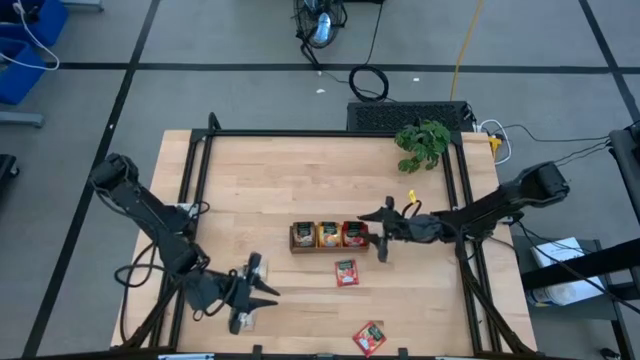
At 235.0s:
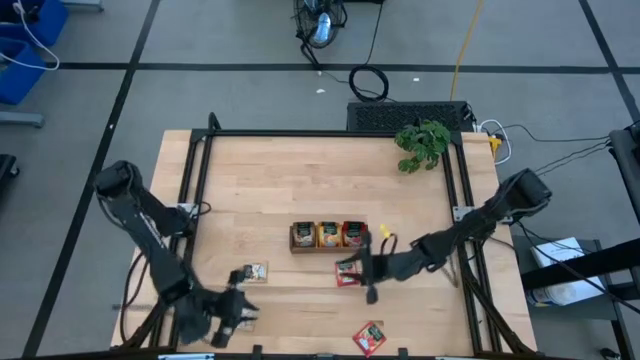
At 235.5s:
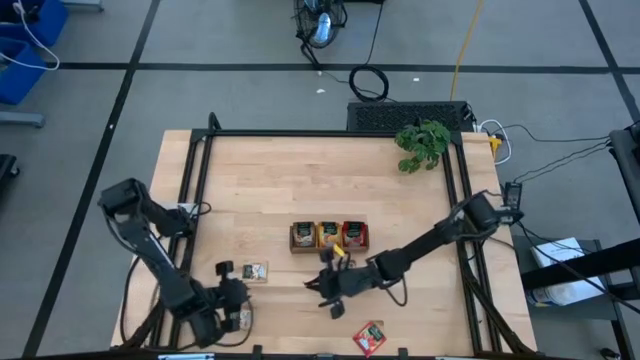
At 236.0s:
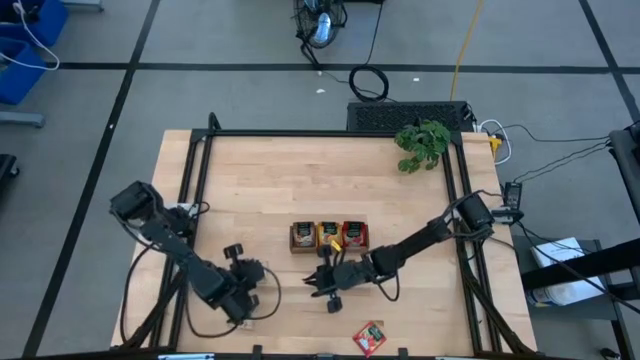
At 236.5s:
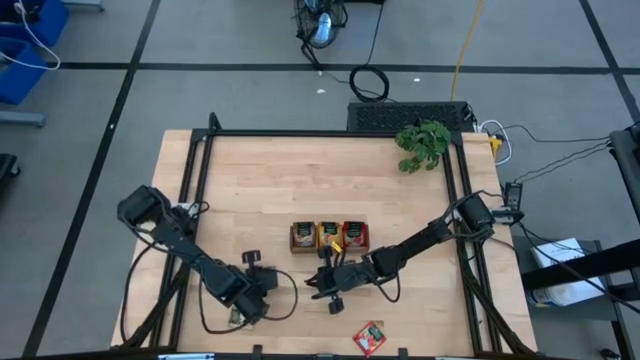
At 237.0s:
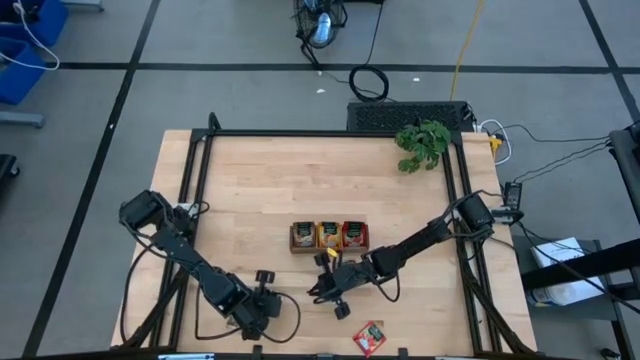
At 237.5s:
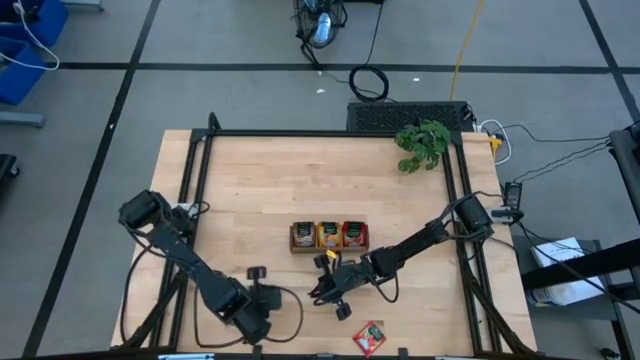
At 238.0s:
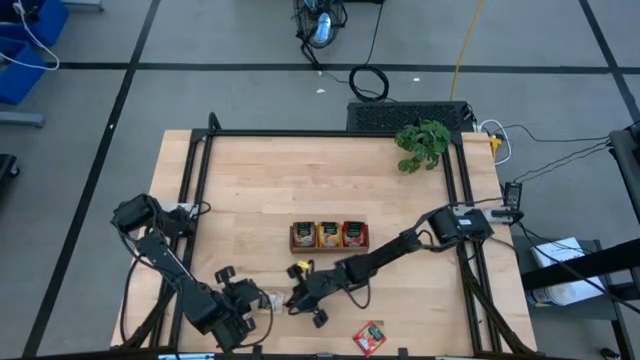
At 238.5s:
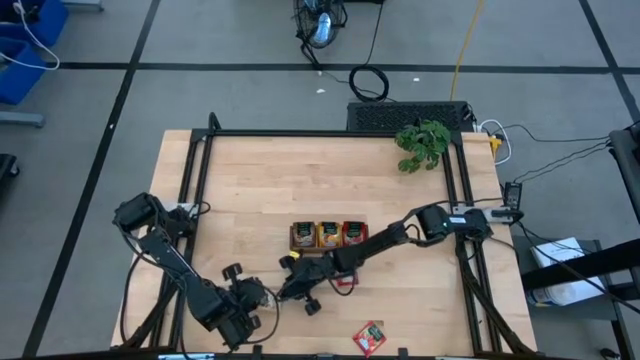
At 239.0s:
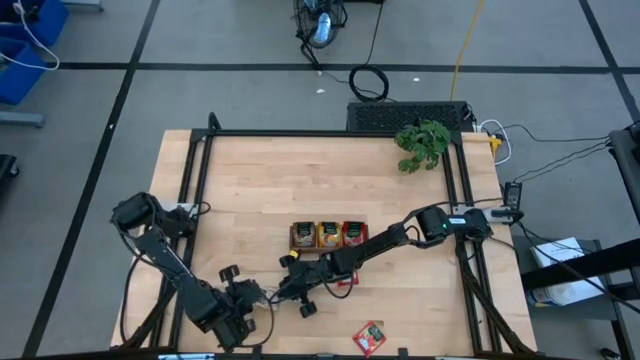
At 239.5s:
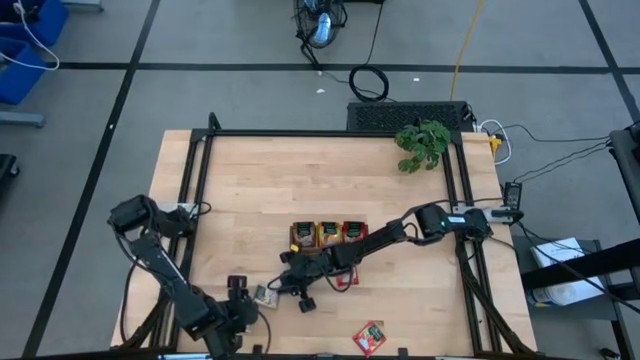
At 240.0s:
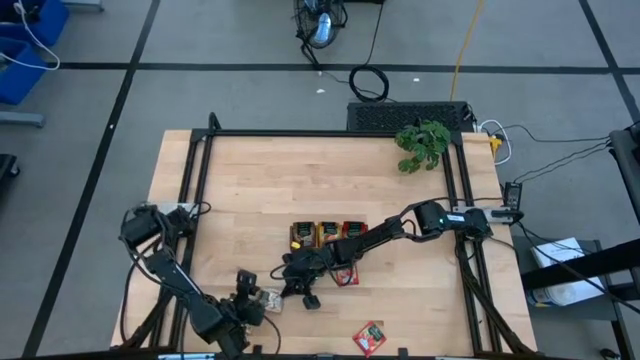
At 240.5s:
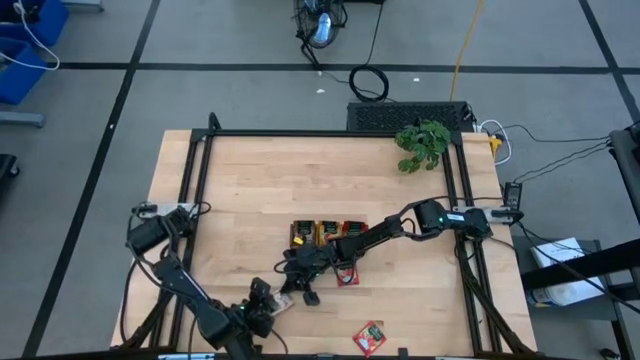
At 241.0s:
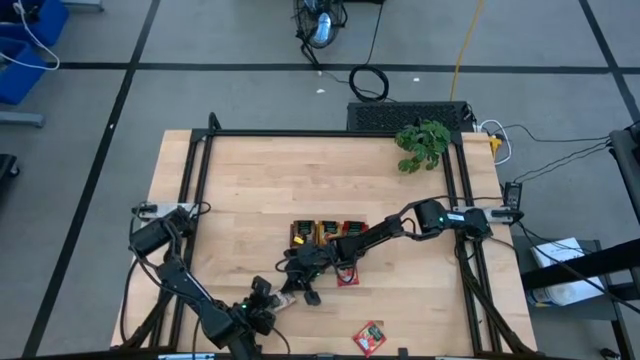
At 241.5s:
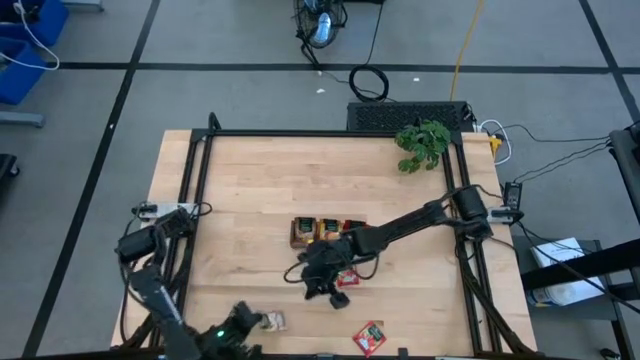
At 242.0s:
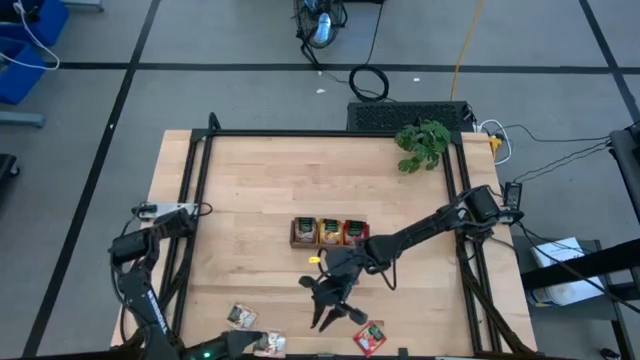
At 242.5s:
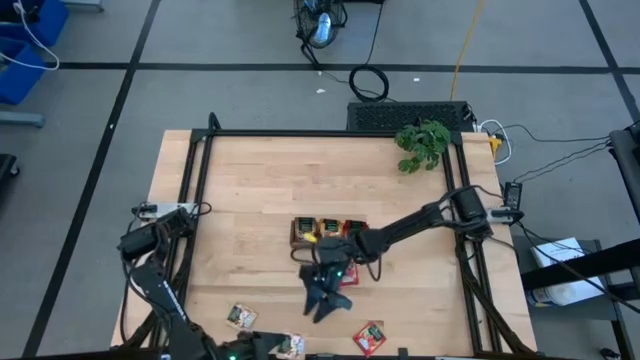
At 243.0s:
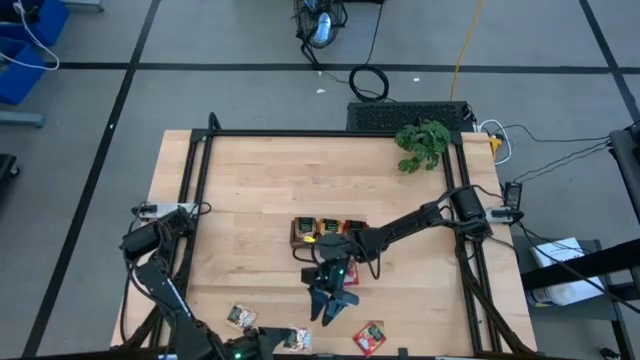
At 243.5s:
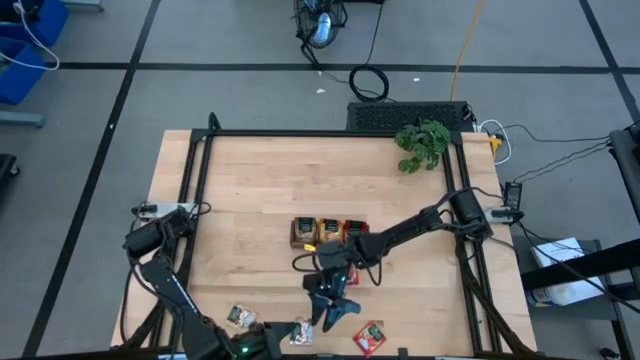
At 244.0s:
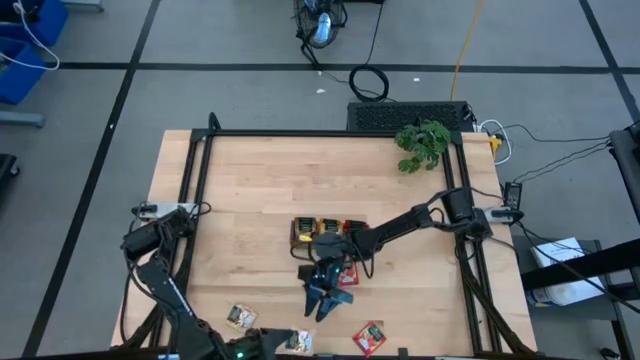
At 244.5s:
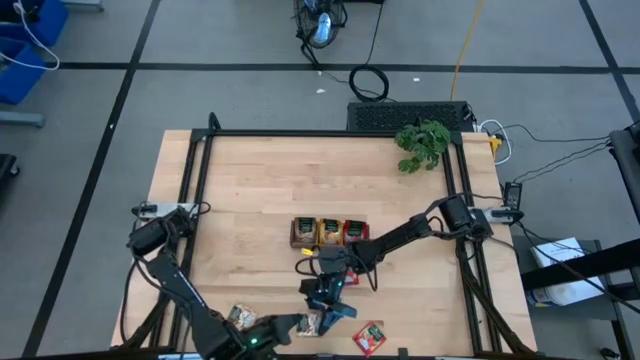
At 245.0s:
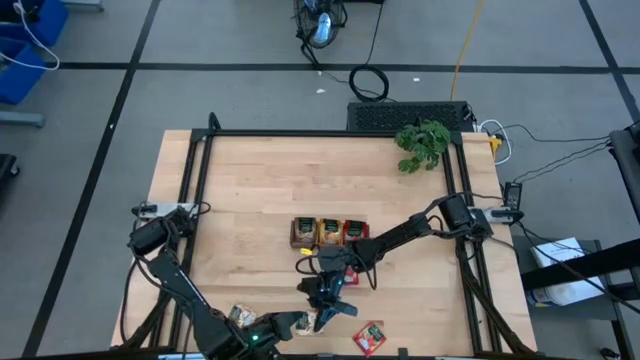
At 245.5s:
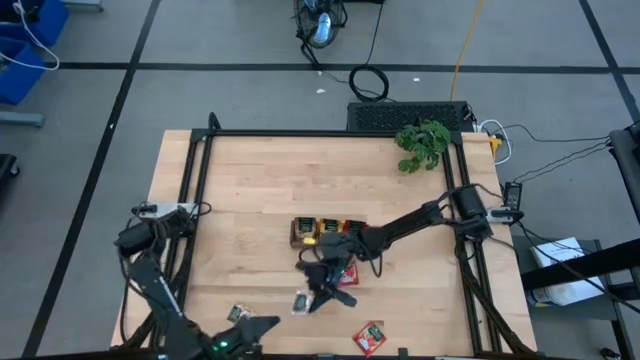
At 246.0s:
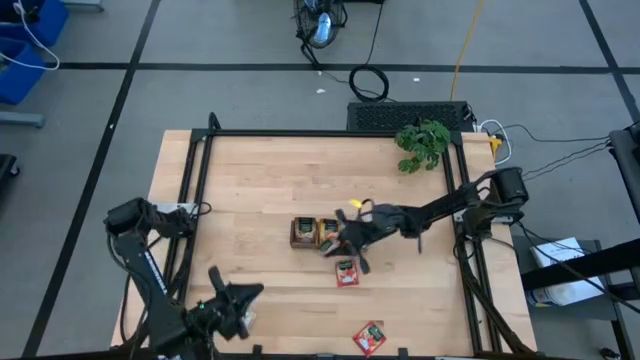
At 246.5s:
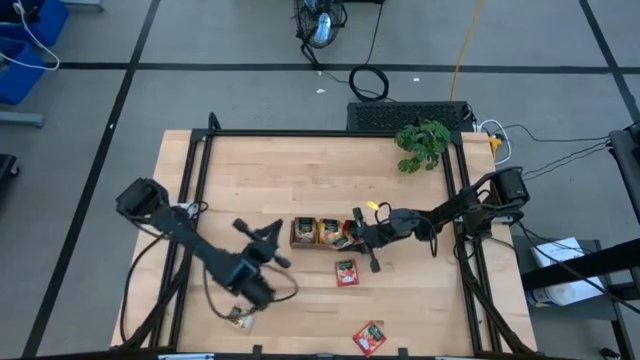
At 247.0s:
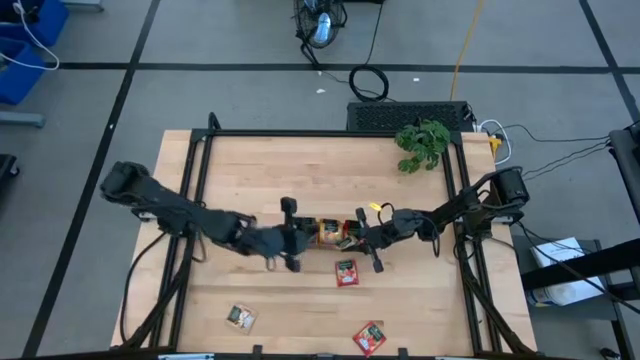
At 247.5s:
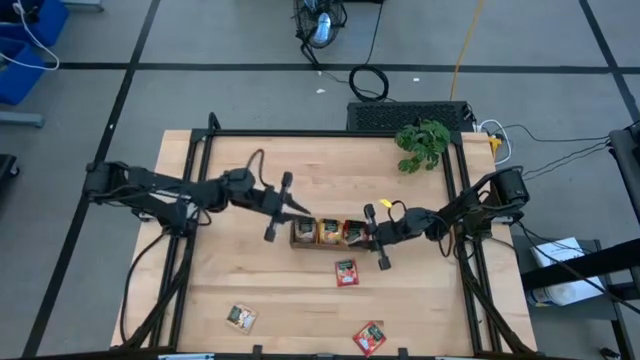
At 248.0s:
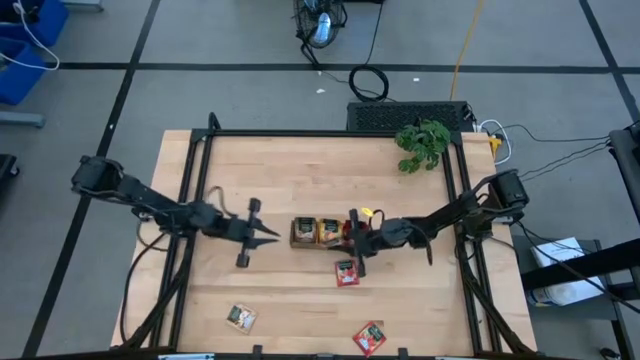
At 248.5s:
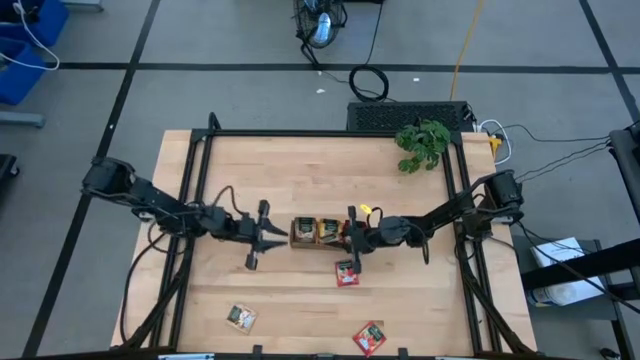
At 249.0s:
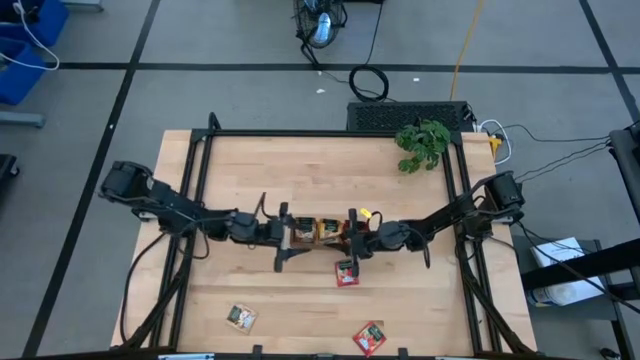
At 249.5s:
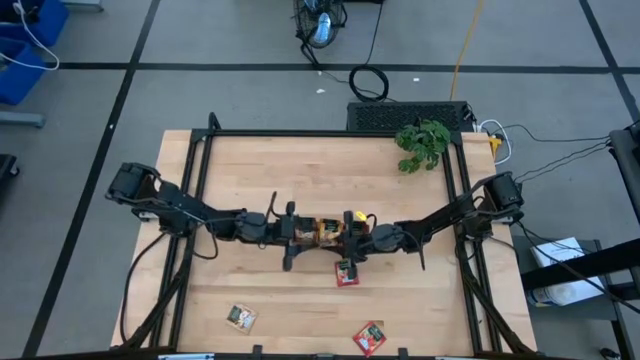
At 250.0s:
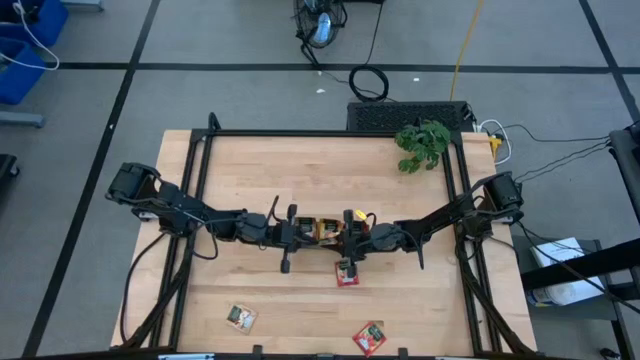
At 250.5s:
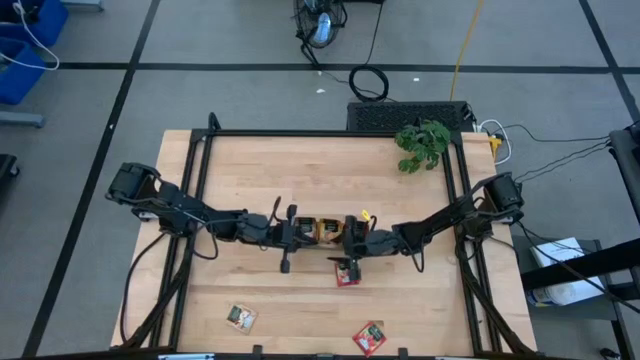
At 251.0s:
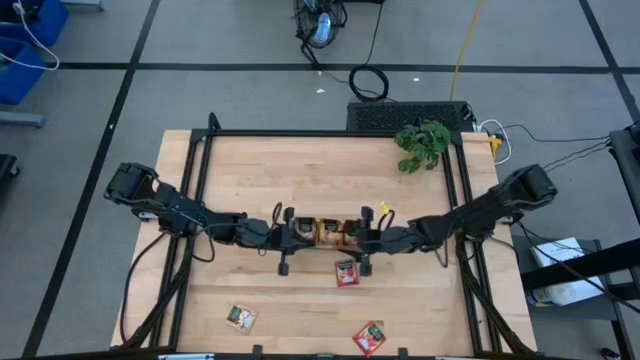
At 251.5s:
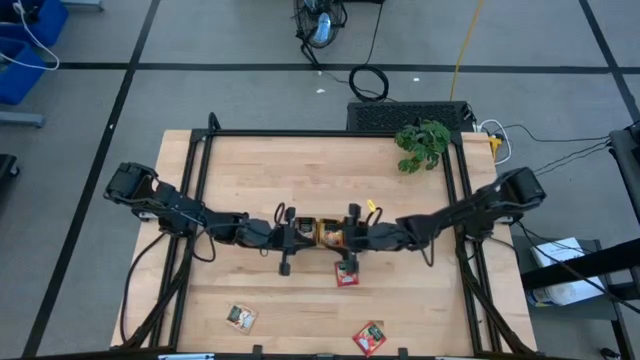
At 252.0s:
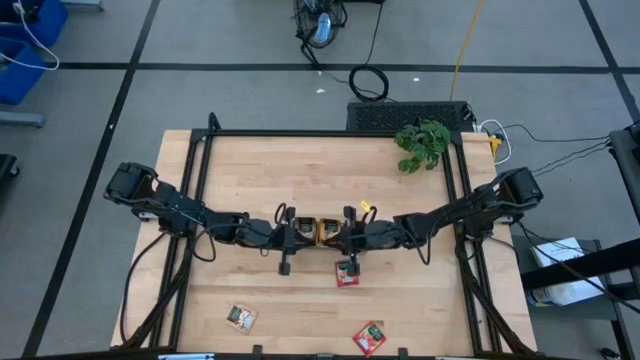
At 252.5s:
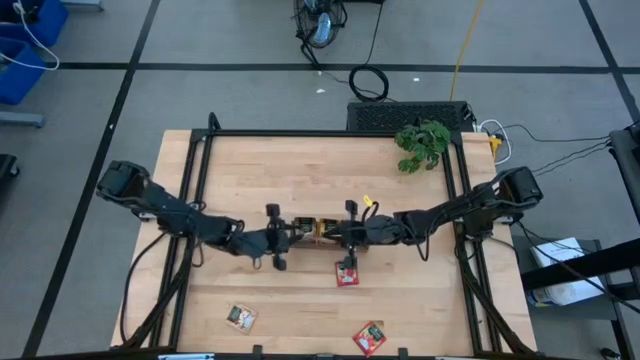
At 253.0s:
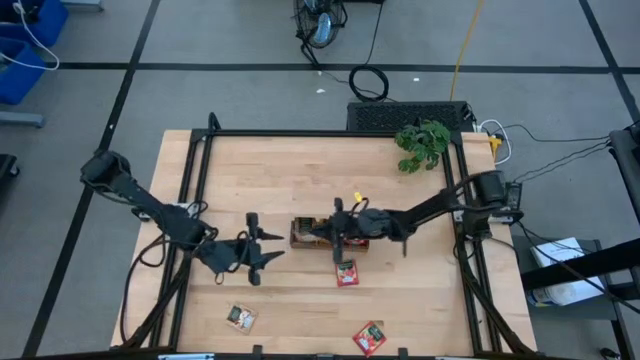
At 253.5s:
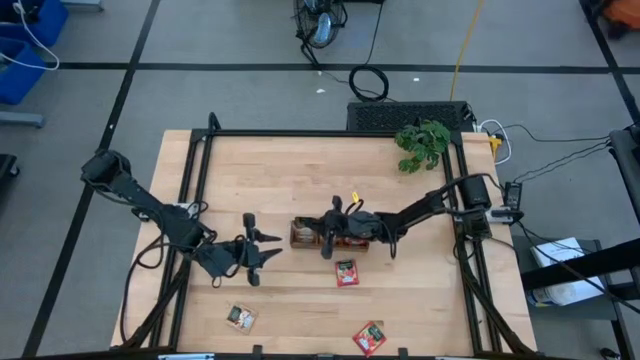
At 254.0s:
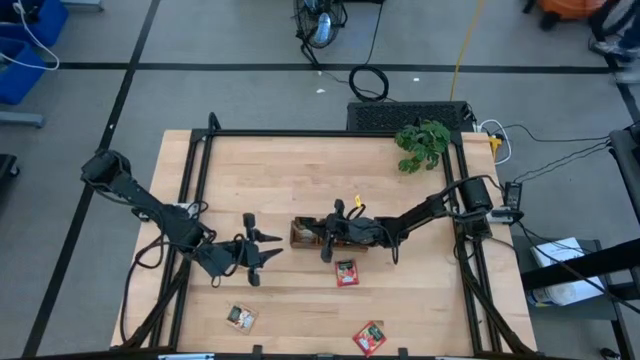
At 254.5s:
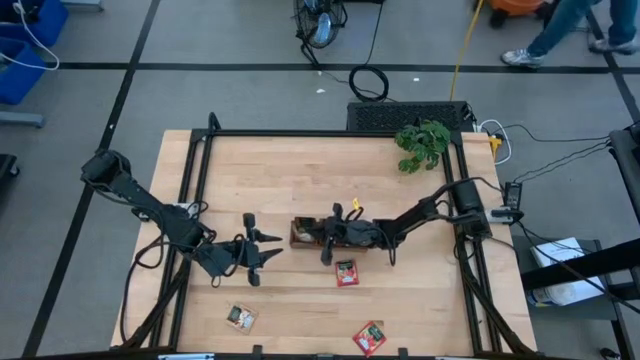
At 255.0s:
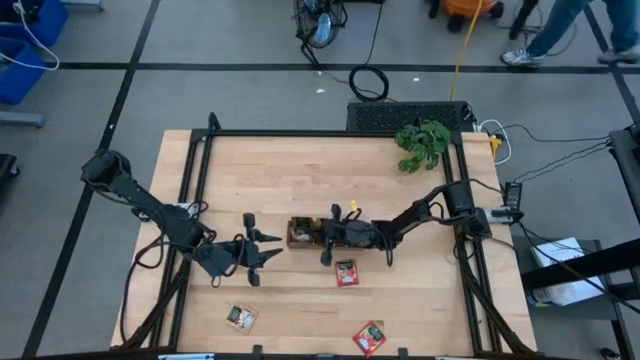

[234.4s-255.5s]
Task: Pick & Place Tea
Put the brown tea bag into the left section of the wooden organizer

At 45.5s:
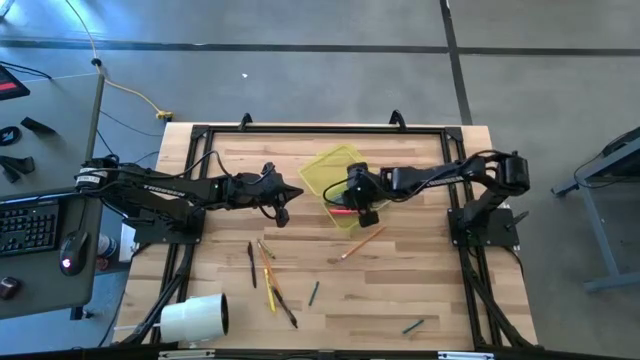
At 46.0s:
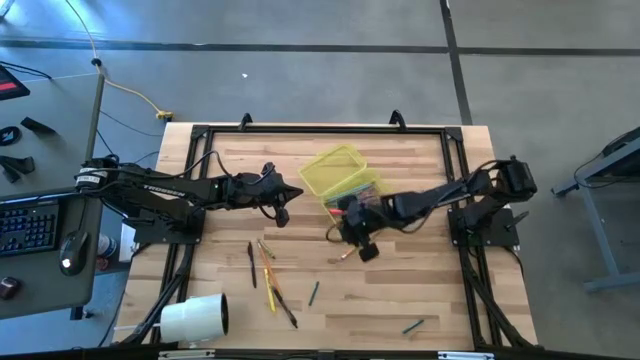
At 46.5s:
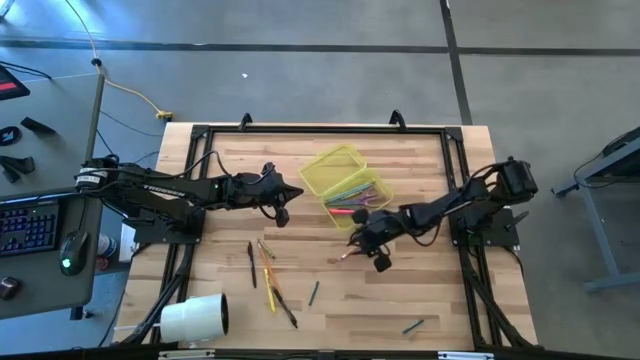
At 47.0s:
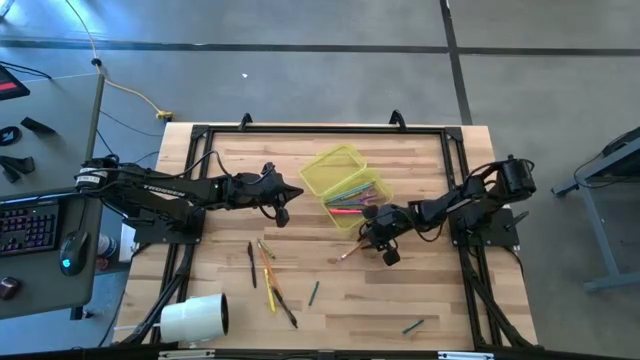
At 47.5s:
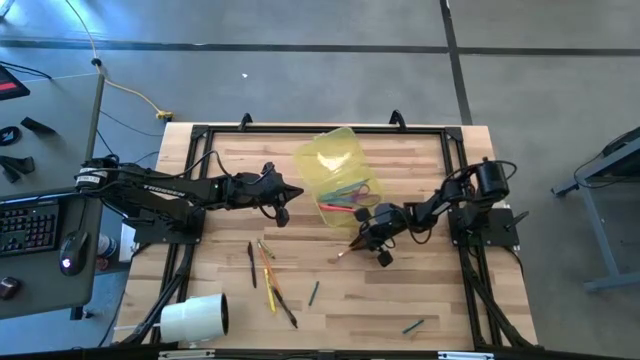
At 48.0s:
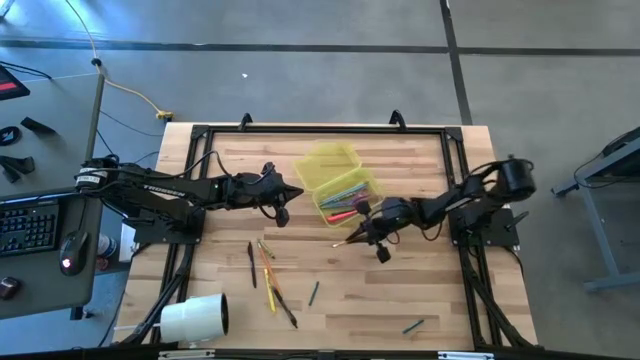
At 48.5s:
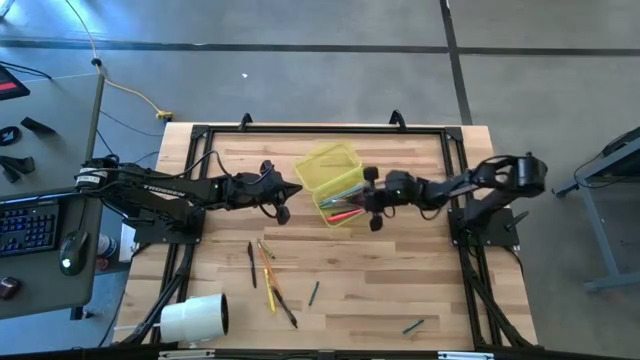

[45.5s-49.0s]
Task: Pick & place school supplies into a supply box
Put the right orange pencil into the supply box
